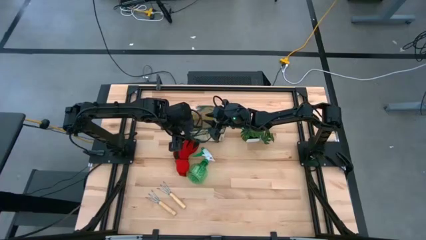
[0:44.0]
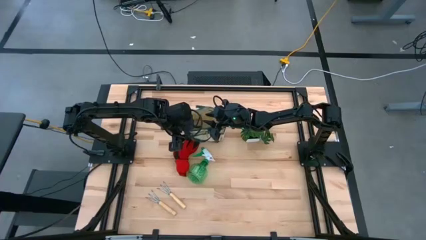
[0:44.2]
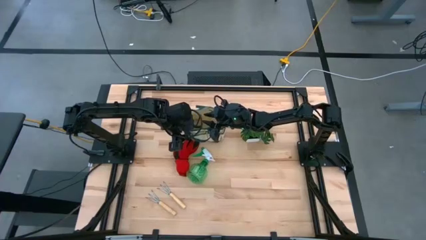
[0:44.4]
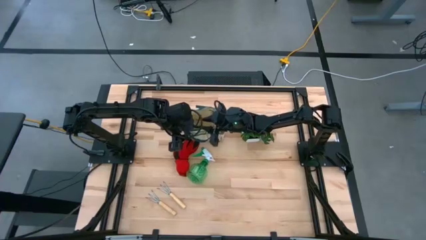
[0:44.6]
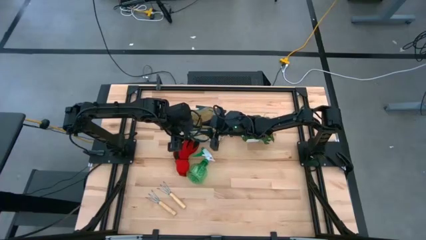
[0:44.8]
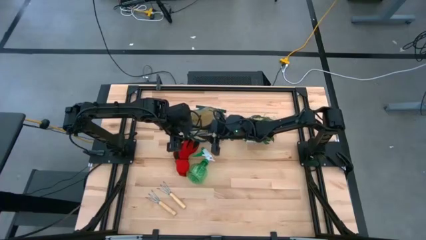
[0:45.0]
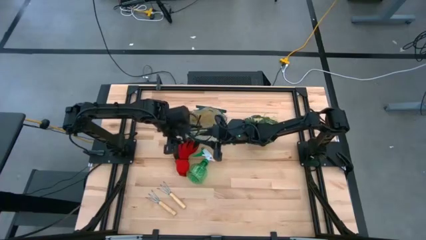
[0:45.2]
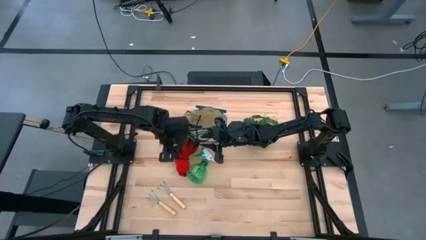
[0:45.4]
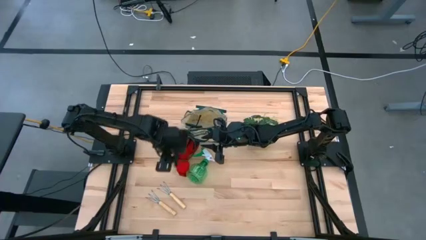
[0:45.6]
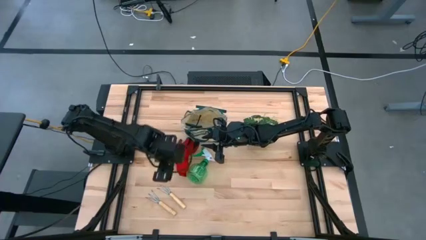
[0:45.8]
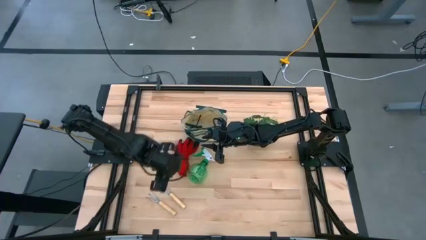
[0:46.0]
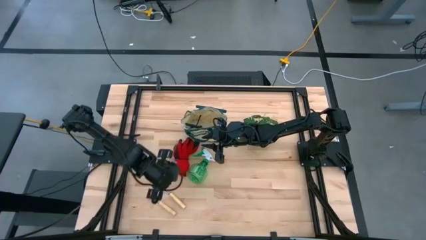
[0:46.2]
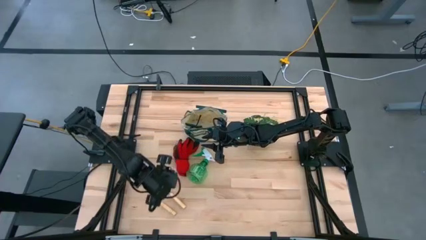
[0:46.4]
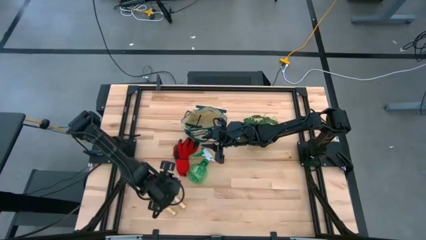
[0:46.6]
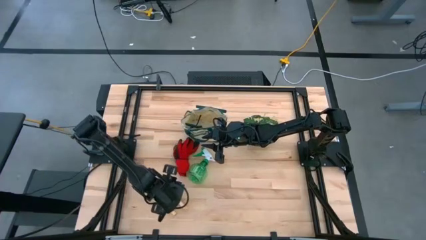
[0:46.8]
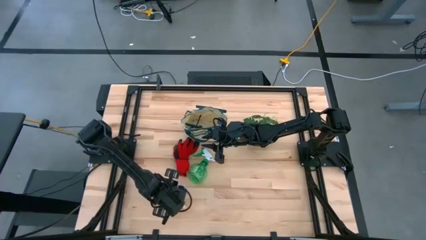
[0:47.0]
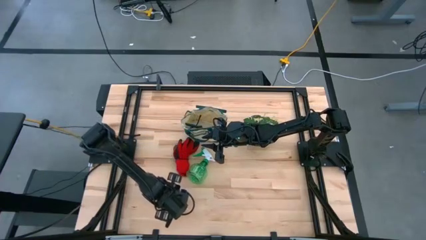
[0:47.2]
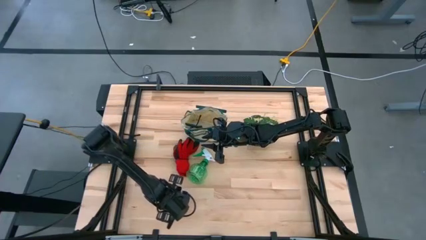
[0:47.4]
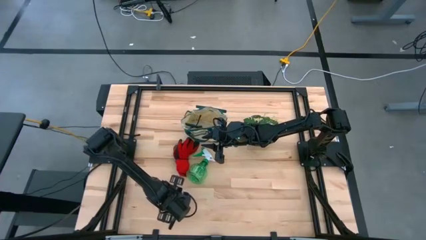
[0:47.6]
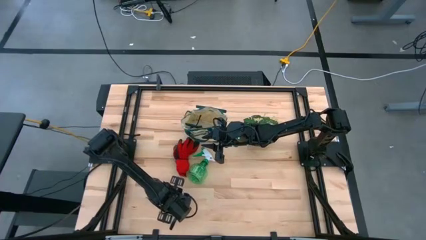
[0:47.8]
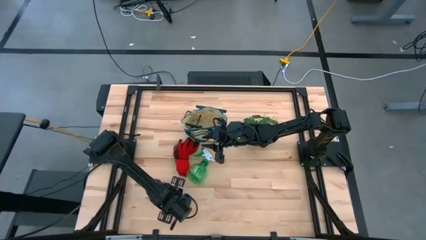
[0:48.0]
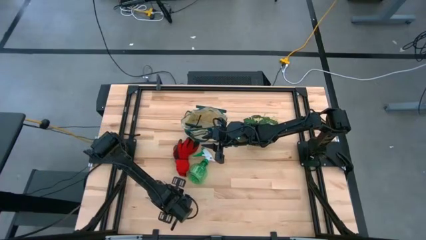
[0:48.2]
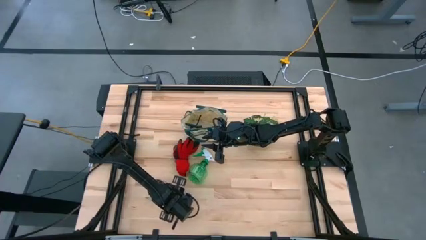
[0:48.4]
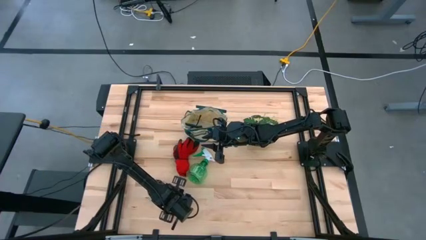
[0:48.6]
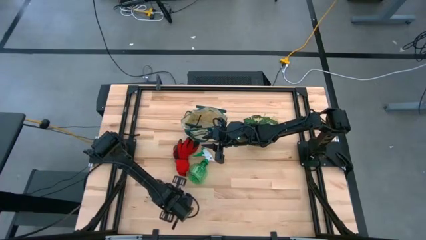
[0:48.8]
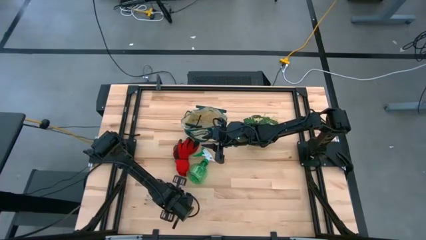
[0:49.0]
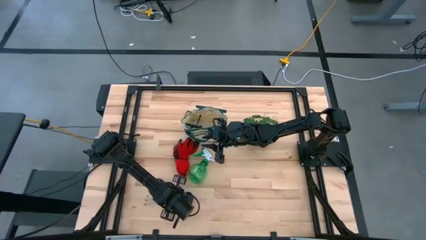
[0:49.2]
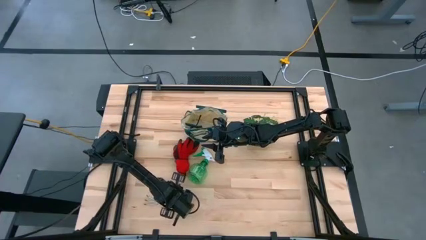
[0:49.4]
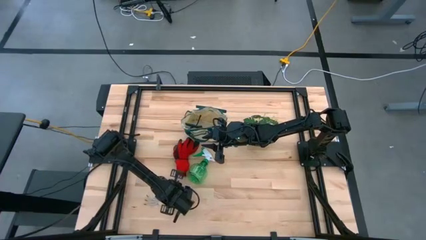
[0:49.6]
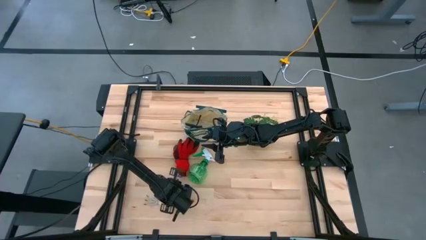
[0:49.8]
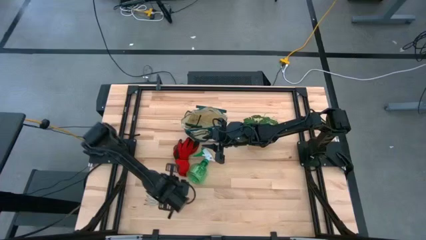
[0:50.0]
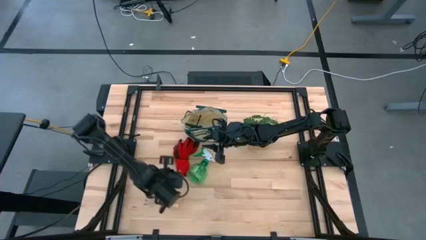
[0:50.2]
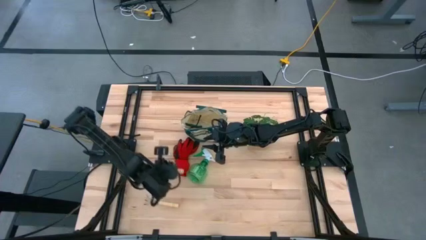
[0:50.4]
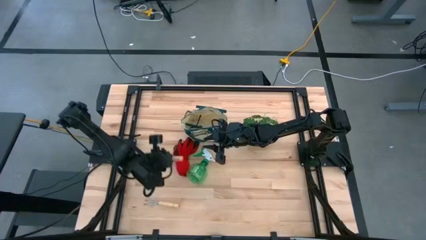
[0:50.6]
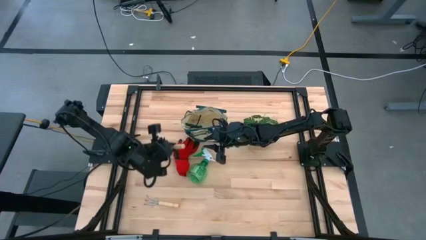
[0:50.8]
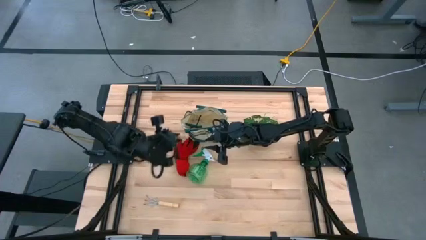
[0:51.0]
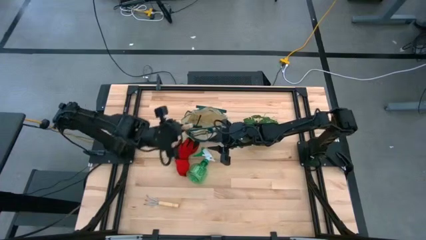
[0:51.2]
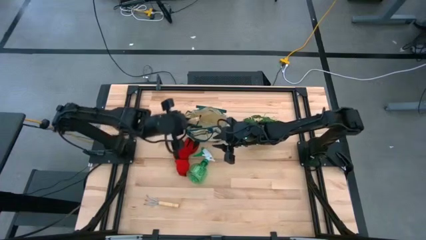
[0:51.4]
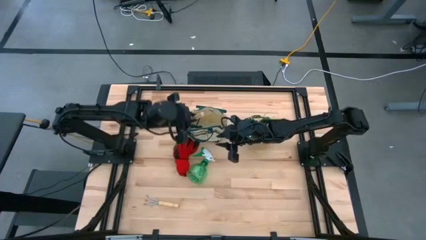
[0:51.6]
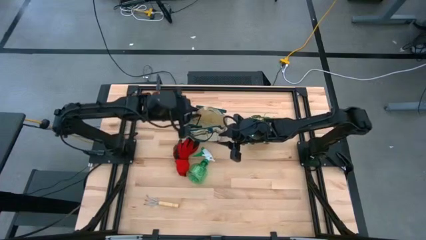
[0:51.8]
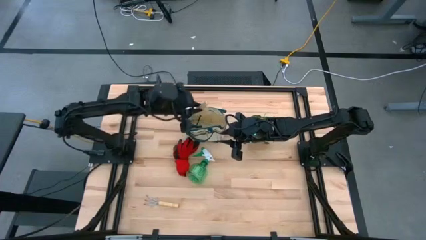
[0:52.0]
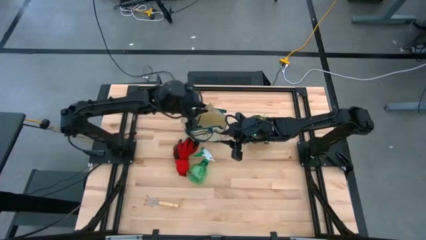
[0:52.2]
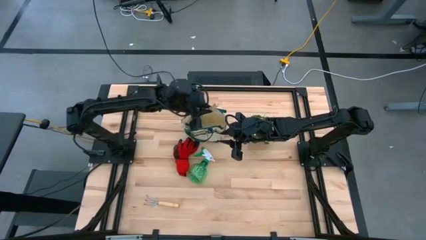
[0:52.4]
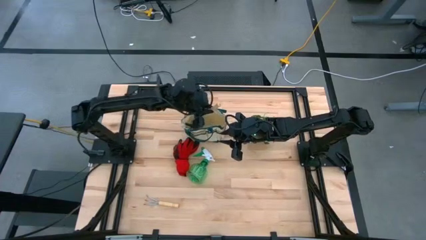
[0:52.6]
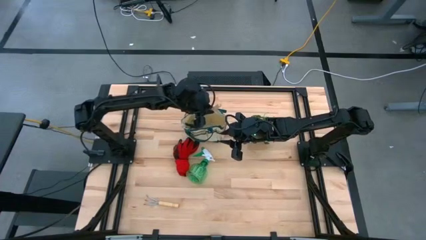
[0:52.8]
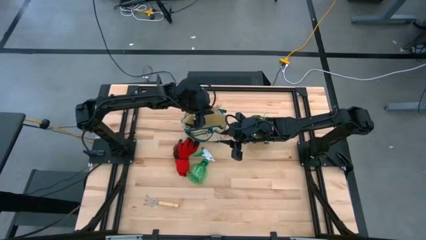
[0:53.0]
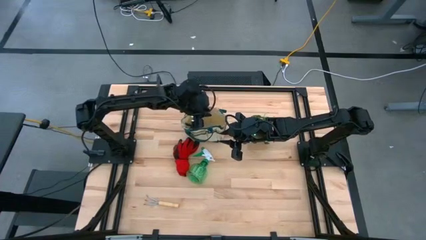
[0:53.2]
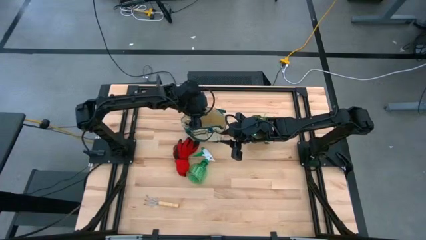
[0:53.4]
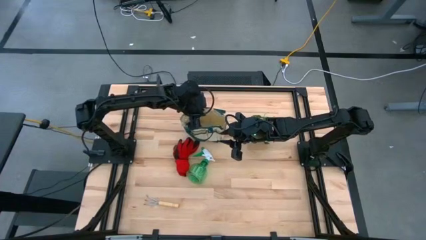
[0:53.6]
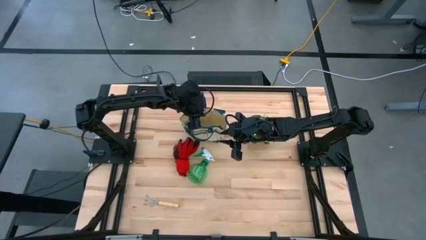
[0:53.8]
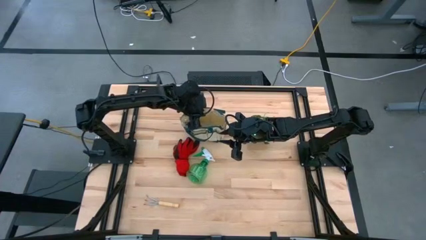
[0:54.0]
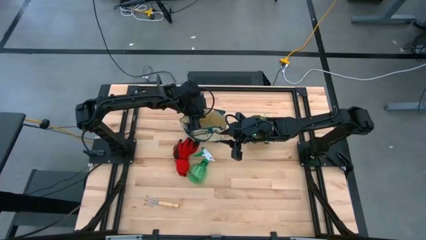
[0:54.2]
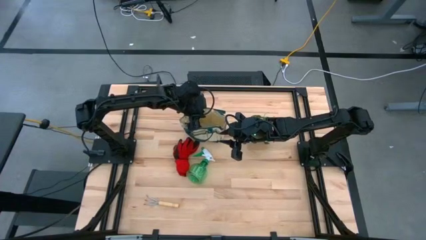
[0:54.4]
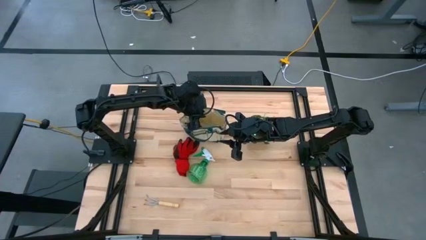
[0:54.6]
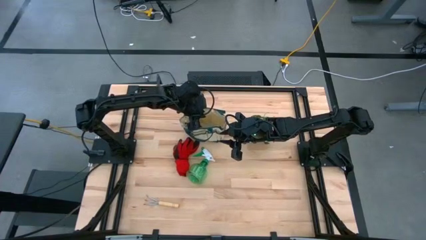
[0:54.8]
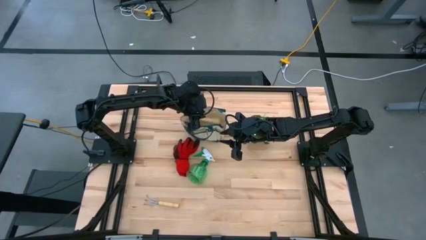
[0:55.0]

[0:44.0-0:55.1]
Task: Pick & Place Garden tools in Gardening bag
Put the light brown hand rake into the green gardening bag
